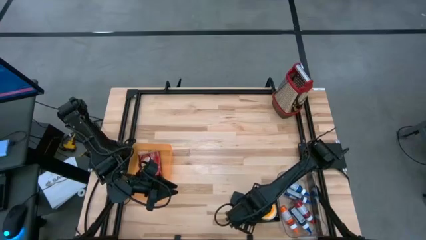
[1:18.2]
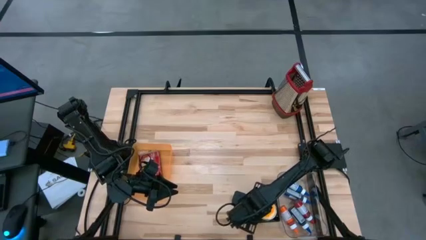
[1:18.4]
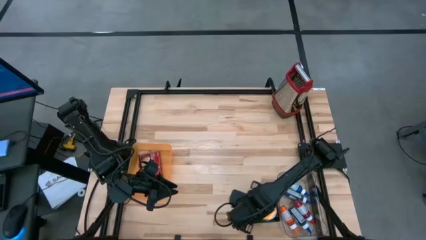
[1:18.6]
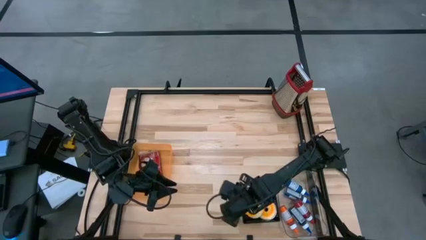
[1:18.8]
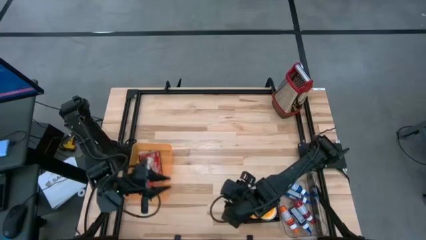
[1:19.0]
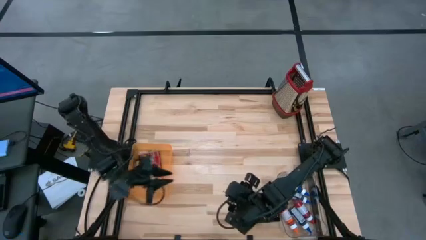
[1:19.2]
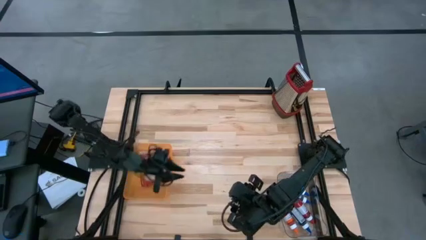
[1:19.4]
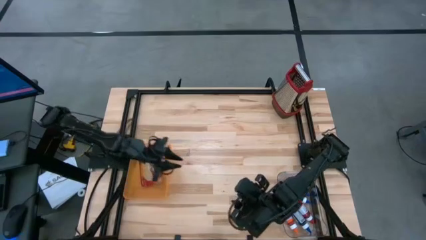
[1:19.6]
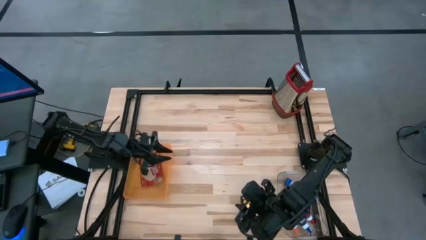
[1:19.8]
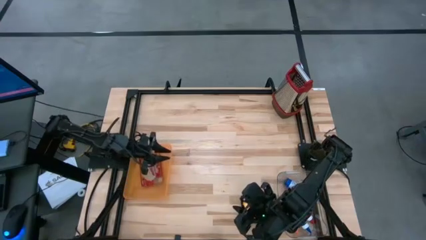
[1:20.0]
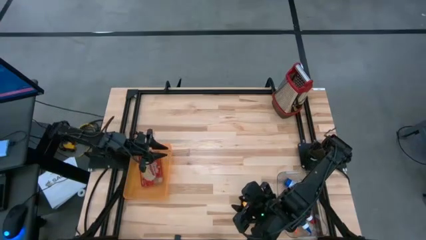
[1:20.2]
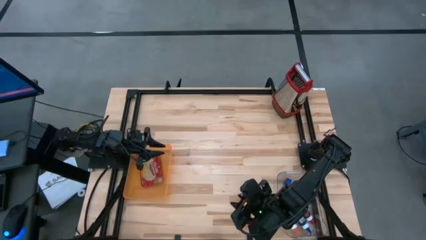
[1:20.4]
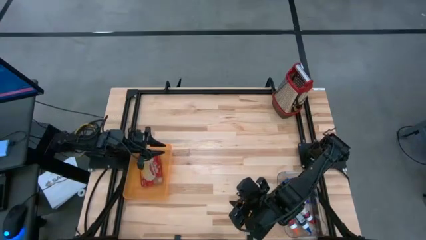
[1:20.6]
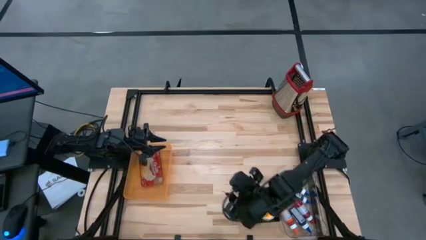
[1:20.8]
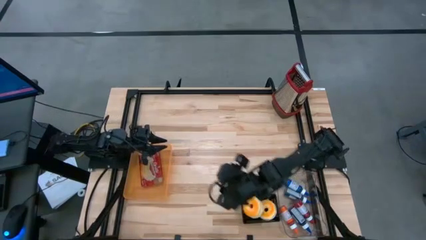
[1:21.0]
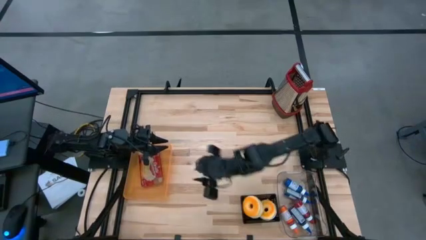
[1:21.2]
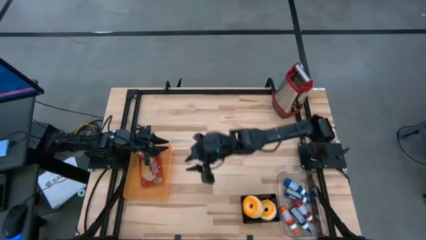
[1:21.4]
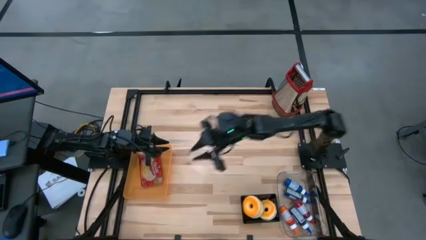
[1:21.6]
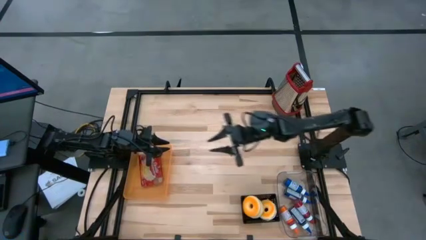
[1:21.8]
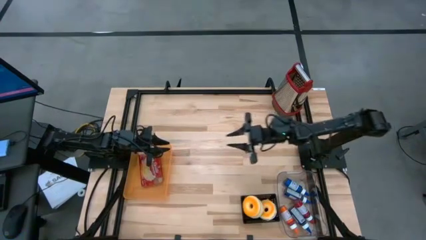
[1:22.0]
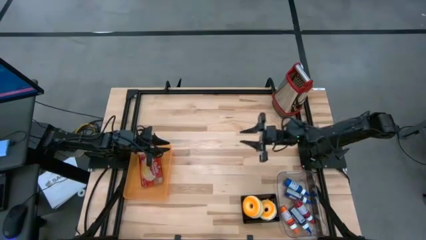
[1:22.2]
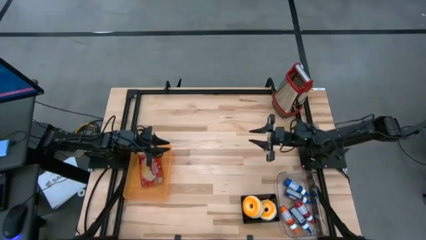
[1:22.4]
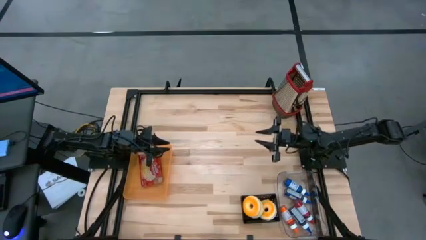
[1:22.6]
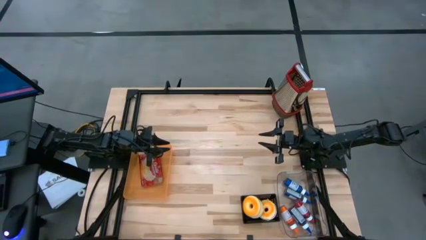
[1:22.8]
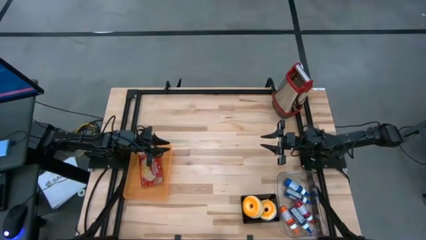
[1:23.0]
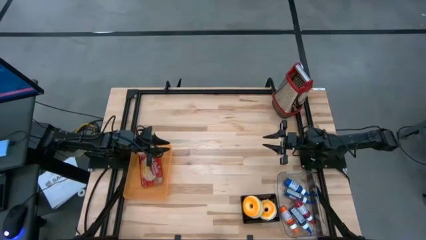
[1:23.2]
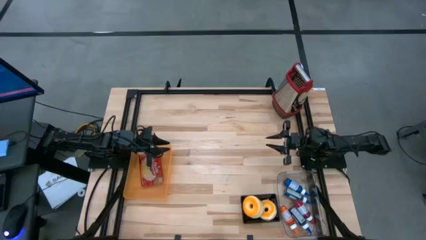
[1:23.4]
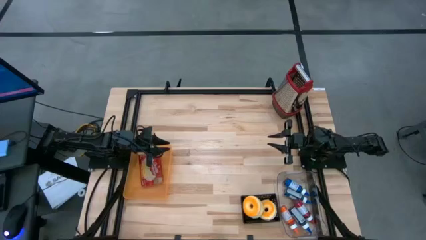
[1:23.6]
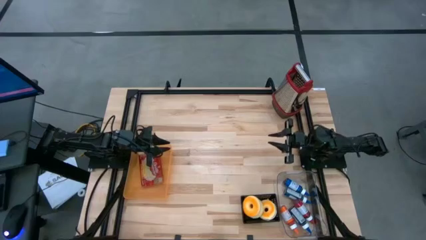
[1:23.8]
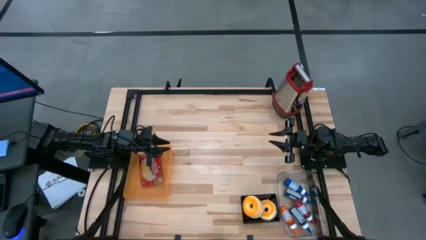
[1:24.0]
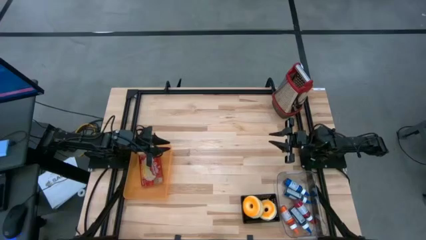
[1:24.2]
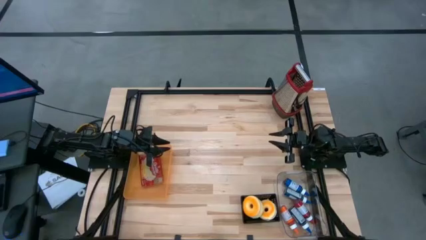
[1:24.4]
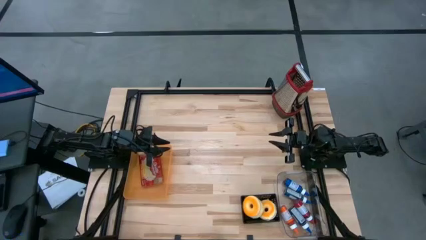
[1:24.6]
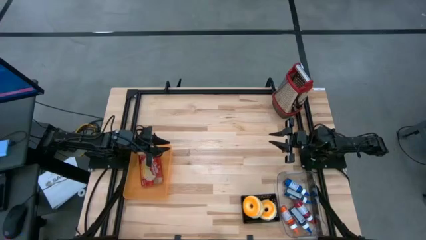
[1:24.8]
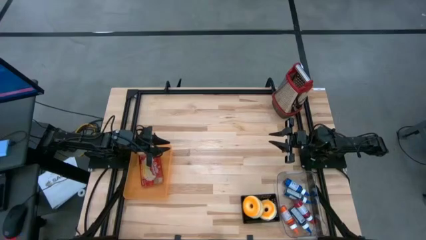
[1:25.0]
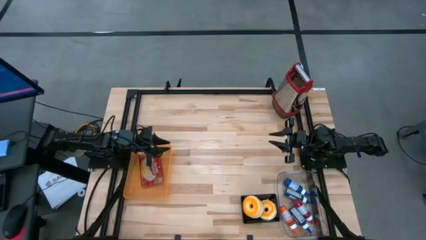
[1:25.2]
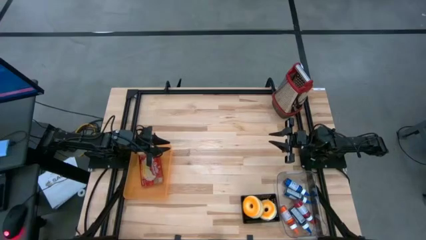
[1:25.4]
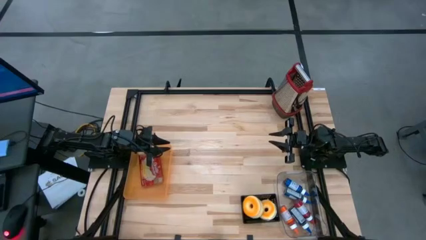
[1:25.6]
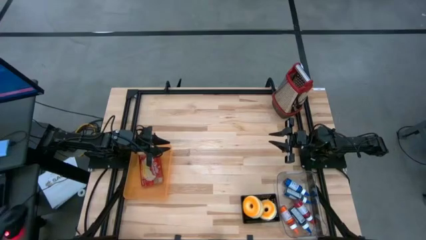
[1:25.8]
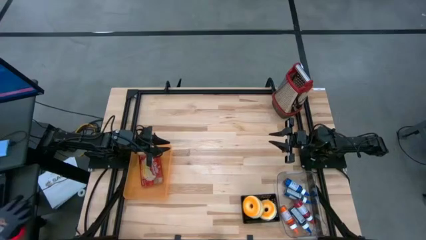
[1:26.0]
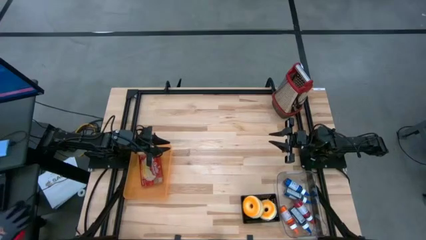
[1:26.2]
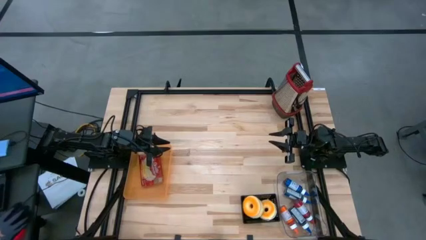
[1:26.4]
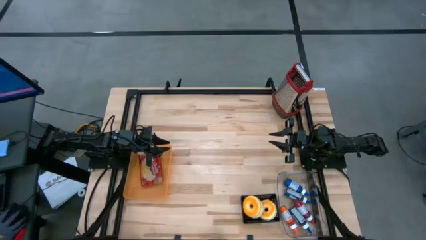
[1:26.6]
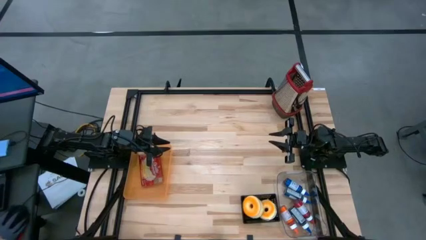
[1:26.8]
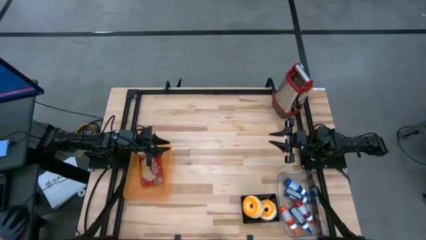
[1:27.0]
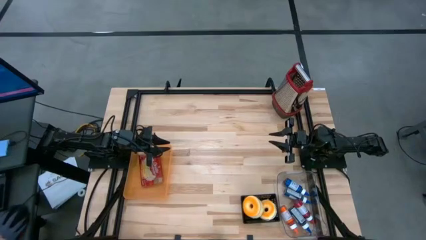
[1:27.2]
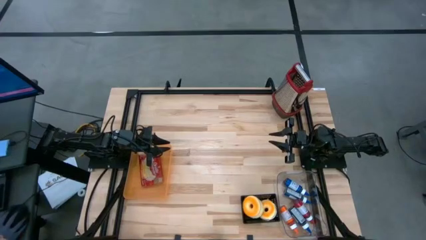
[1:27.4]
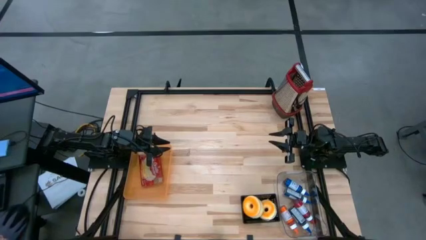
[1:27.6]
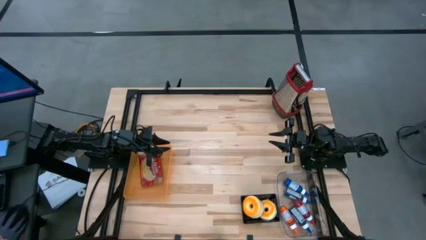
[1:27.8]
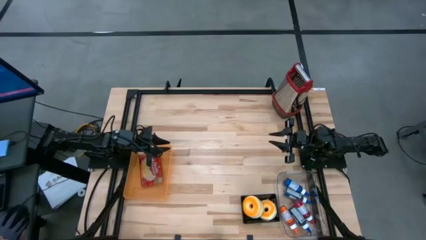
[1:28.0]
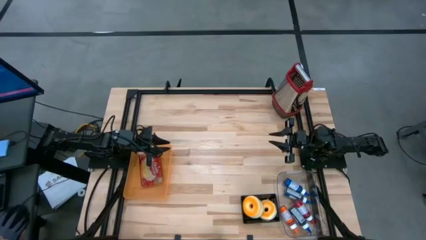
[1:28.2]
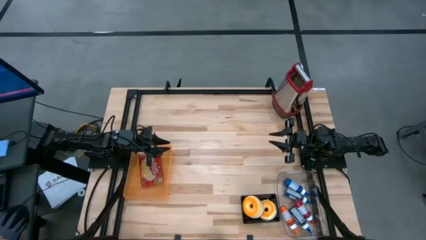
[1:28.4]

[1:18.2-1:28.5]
Task: Pick & Place Food Item
Return to Home Position

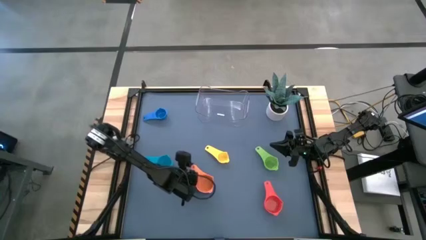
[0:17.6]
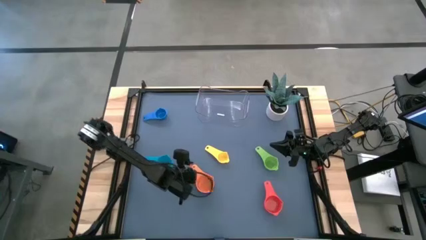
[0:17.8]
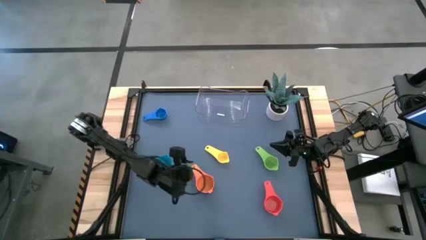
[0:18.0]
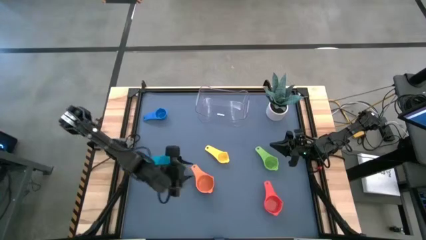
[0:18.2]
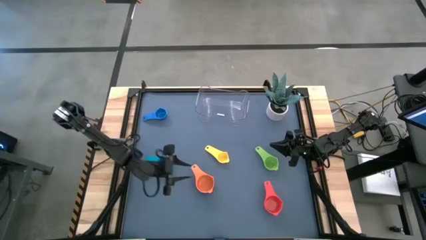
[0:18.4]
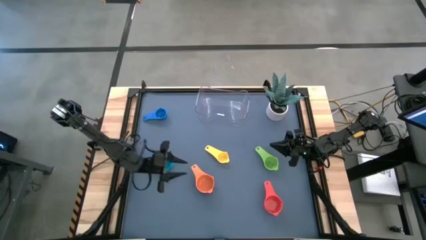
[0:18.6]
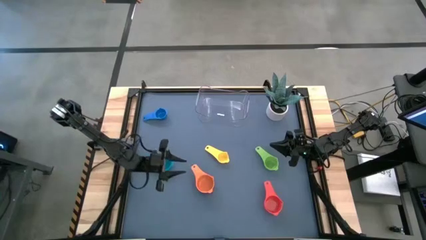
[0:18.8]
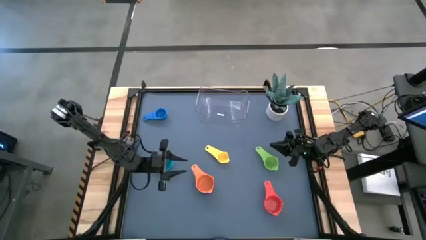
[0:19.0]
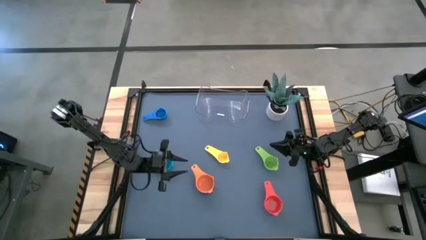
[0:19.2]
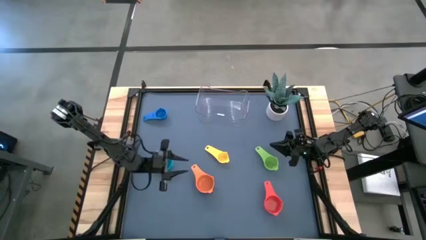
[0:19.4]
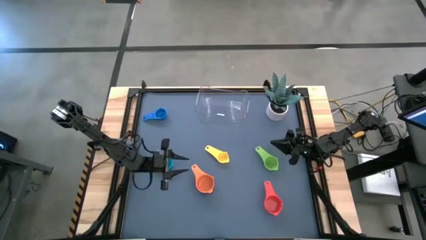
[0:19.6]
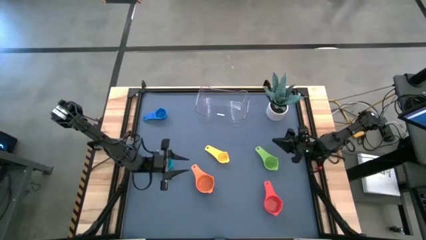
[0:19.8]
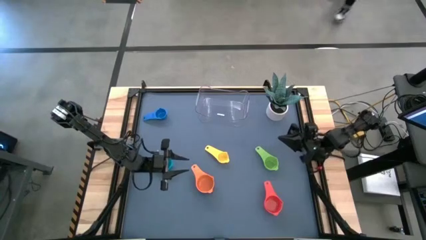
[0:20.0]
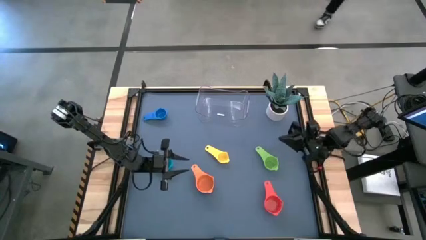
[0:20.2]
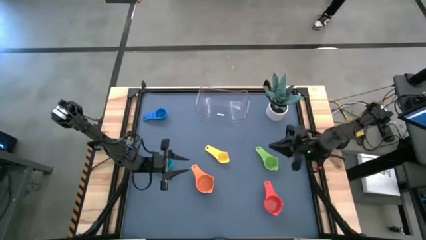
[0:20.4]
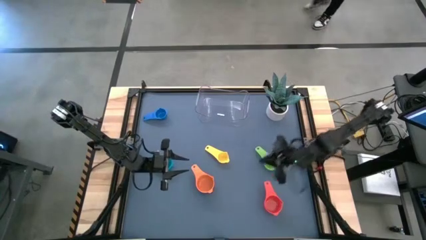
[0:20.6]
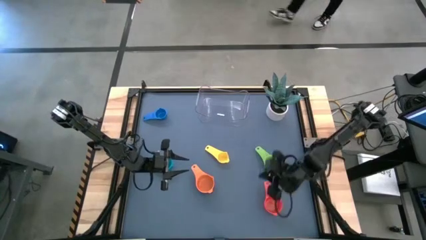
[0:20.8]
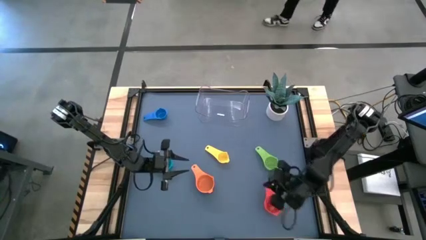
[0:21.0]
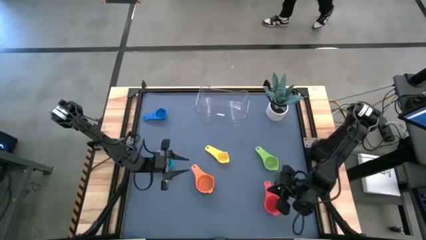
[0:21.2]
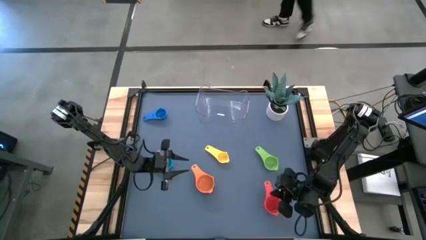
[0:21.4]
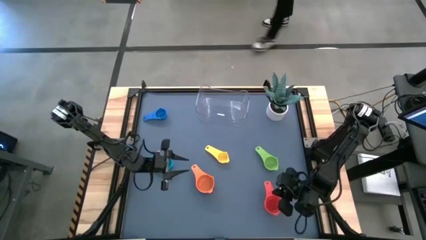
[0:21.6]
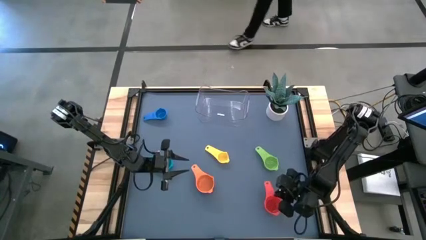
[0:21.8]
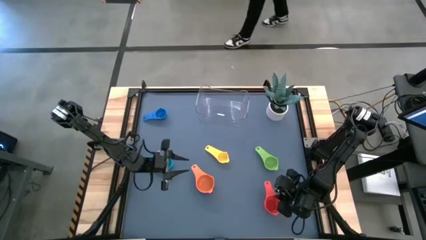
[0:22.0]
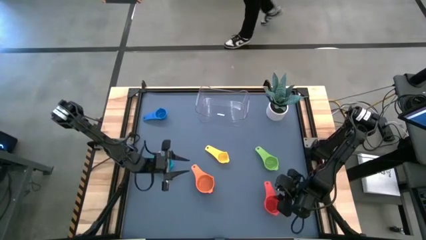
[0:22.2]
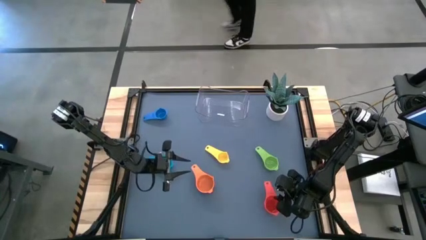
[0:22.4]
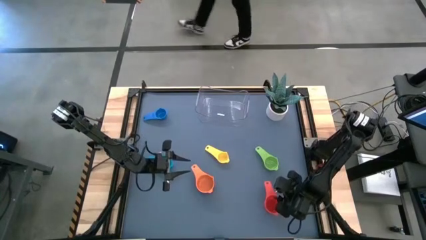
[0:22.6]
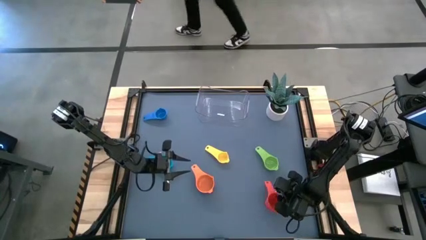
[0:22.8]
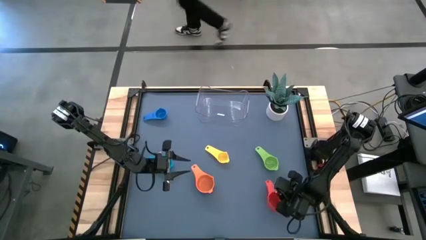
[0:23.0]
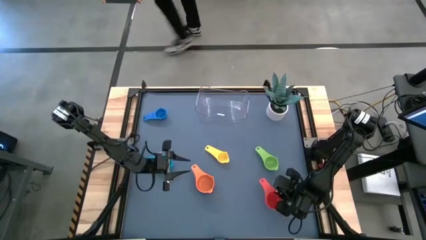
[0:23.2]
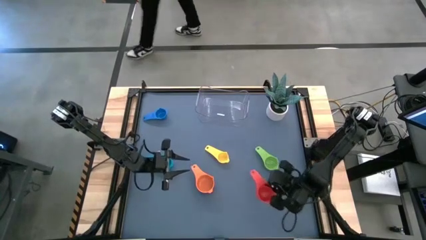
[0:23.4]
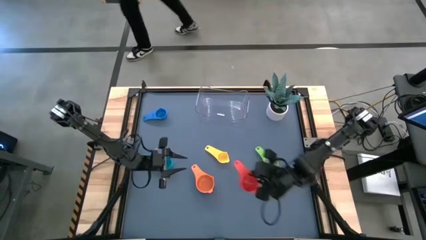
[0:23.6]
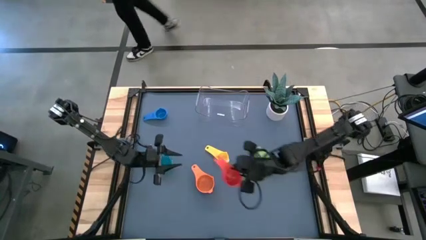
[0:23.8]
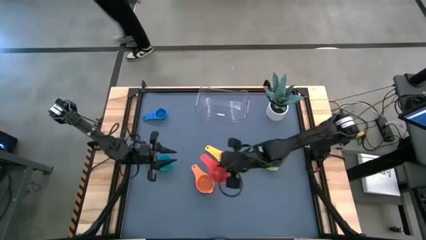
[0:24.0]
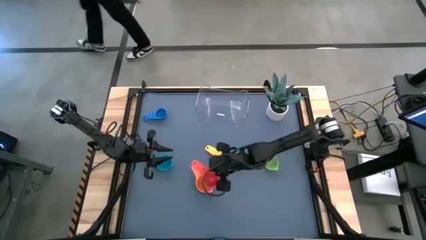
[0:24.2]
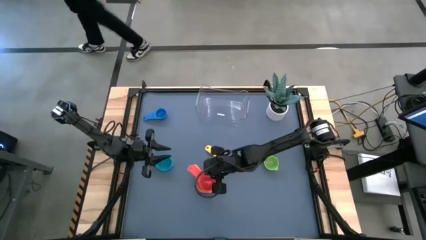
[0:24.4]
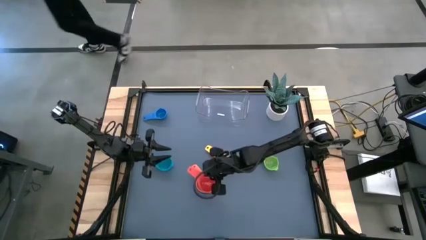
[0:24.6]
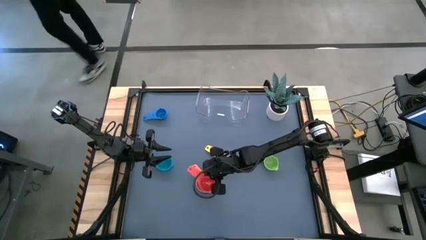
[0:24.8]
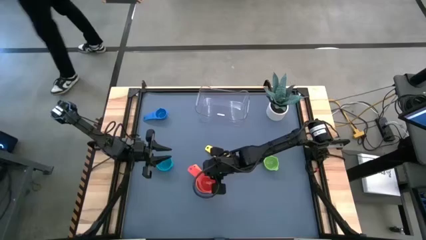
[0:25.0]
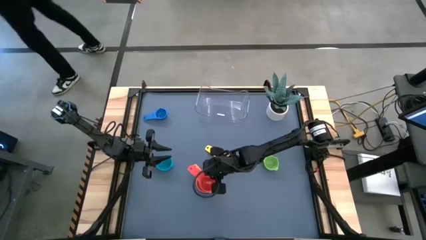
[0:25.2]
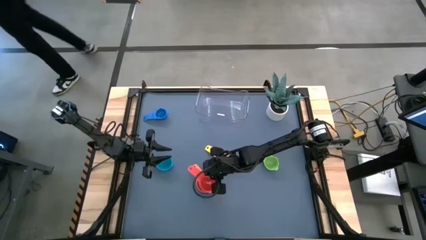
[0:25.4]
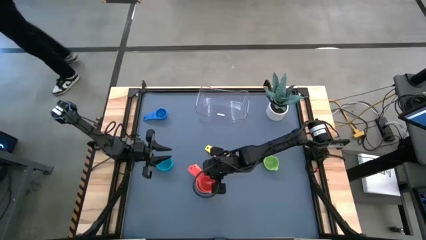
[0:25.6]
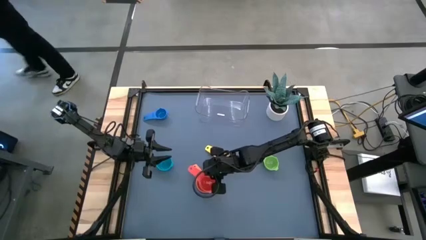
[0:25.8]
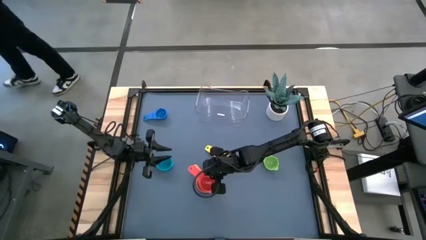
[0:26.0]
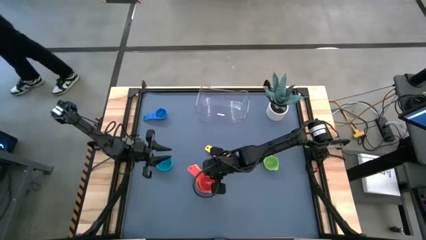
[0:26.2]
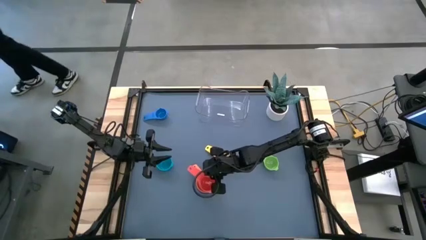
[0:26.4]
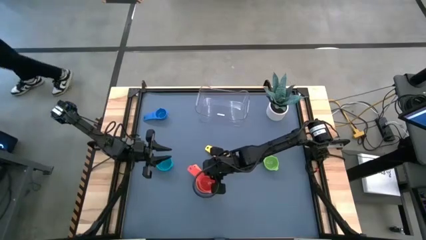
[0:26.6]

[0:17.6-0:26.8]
Task: Nest measuring cups in basket
Stack the red measuring cup on top of the orange measuring cup
